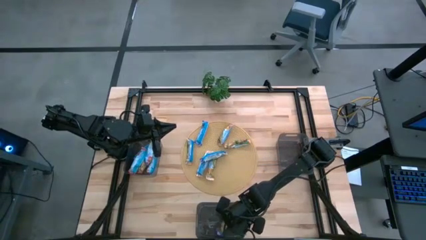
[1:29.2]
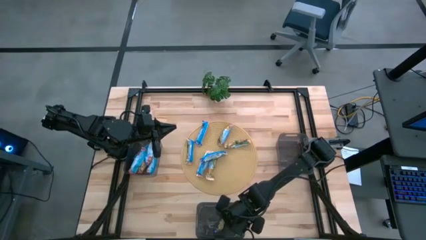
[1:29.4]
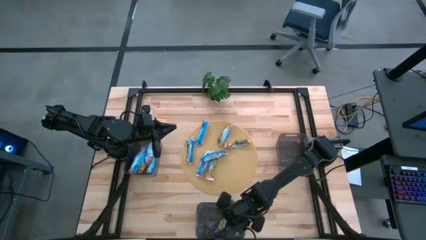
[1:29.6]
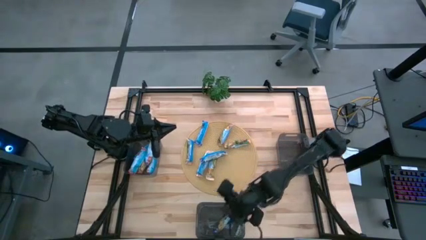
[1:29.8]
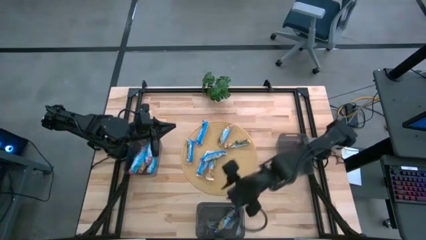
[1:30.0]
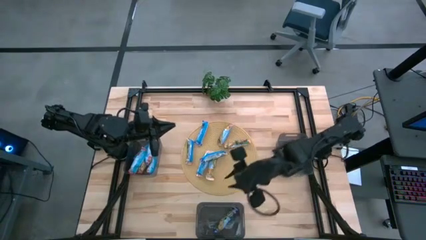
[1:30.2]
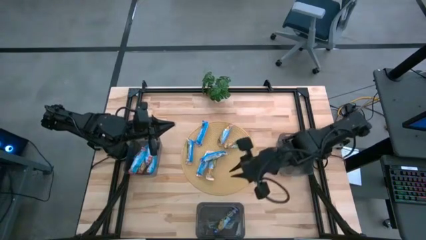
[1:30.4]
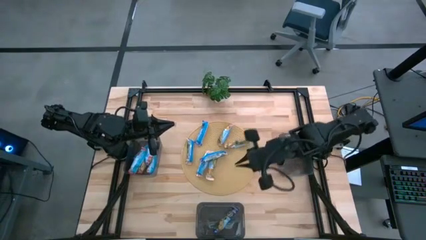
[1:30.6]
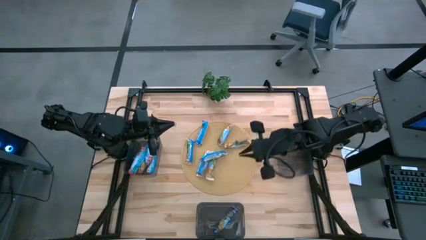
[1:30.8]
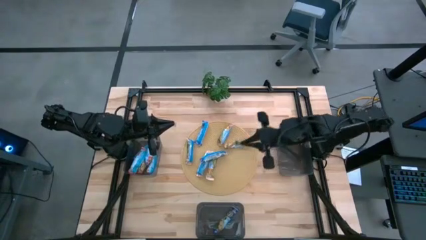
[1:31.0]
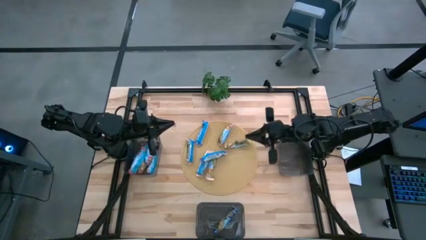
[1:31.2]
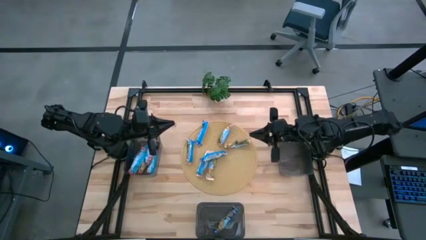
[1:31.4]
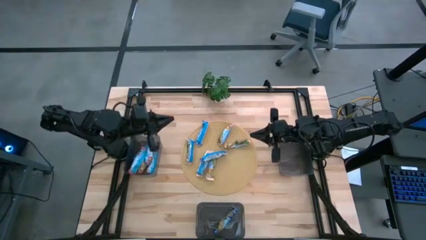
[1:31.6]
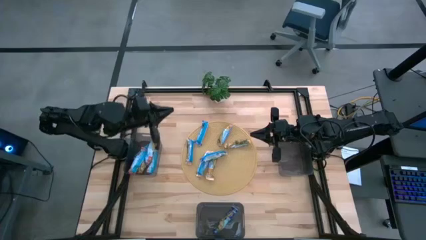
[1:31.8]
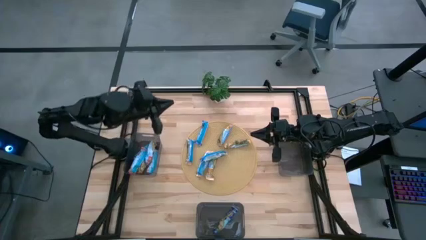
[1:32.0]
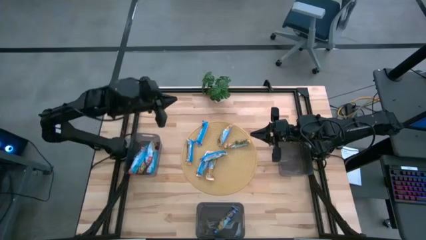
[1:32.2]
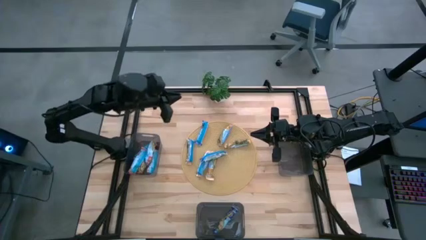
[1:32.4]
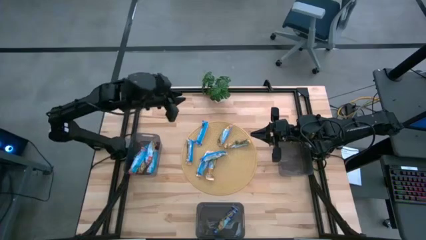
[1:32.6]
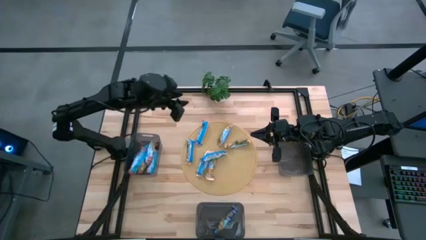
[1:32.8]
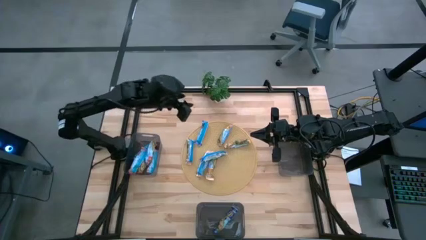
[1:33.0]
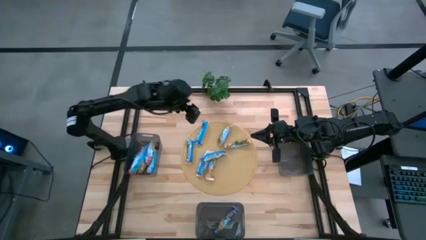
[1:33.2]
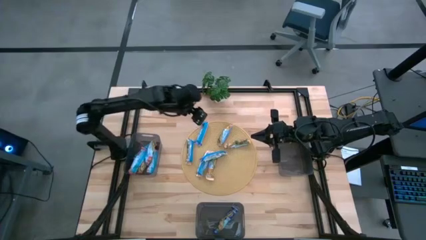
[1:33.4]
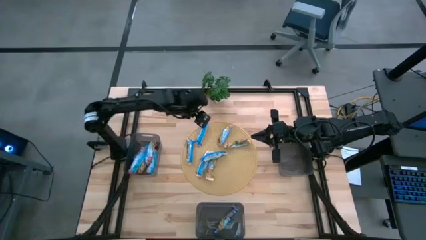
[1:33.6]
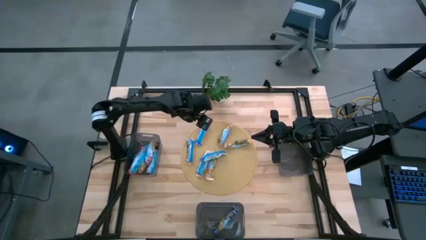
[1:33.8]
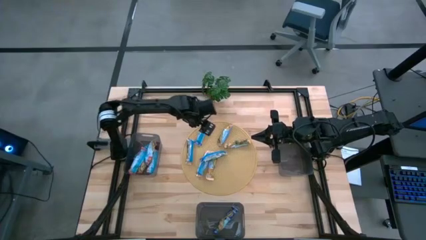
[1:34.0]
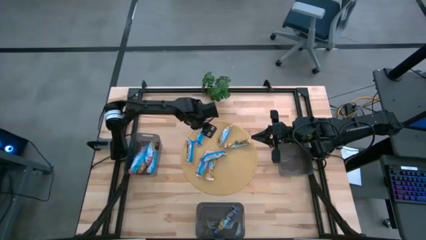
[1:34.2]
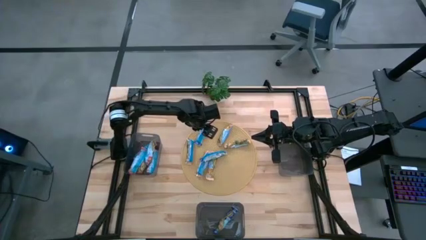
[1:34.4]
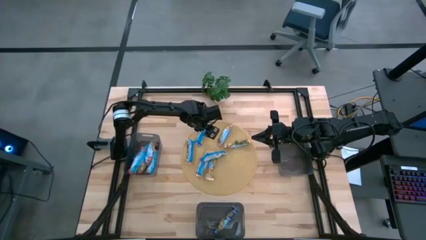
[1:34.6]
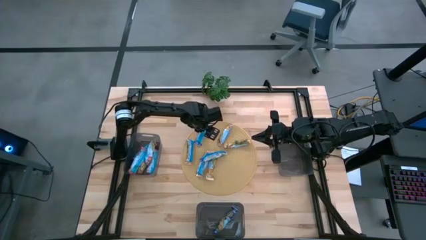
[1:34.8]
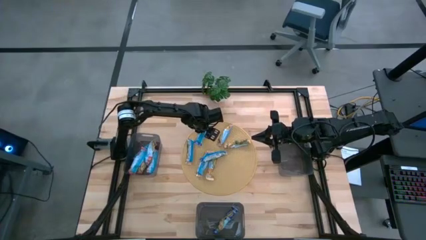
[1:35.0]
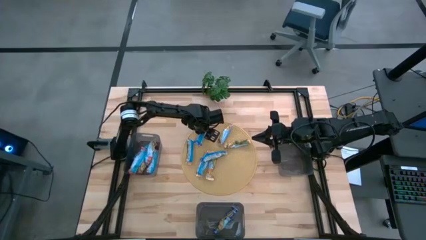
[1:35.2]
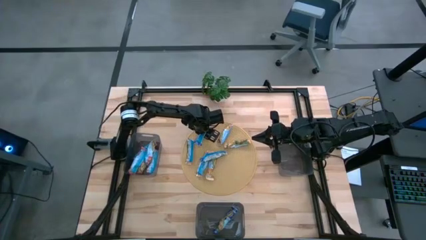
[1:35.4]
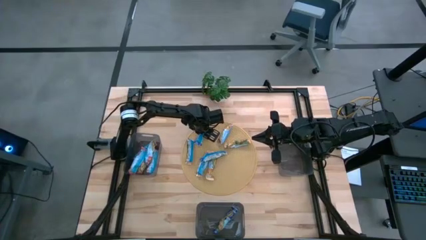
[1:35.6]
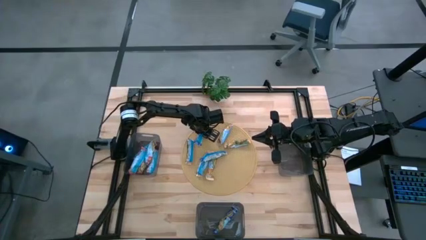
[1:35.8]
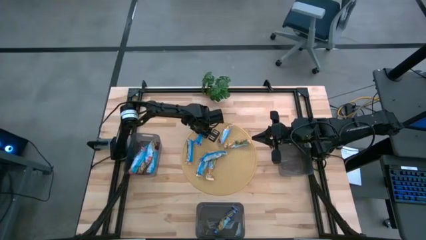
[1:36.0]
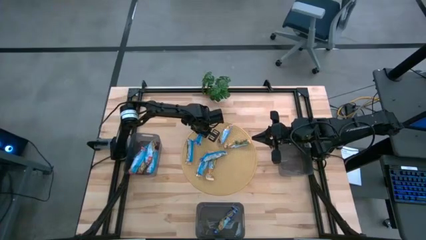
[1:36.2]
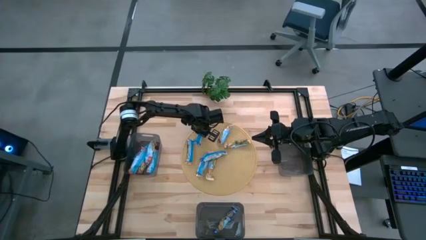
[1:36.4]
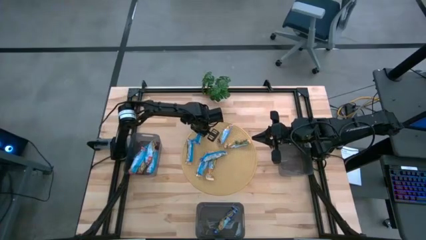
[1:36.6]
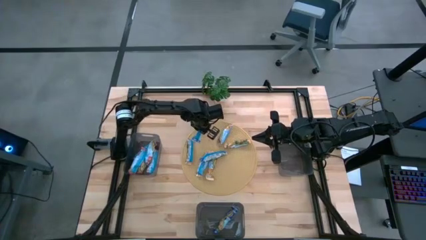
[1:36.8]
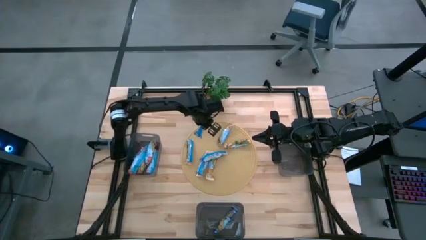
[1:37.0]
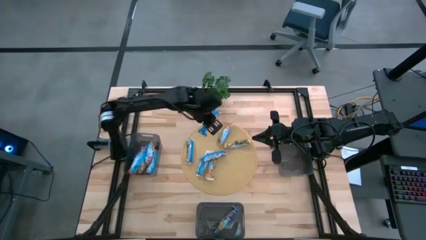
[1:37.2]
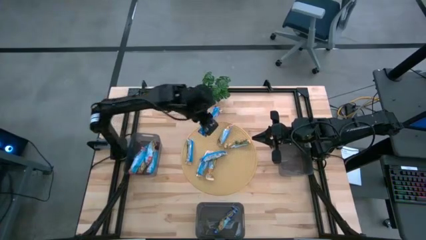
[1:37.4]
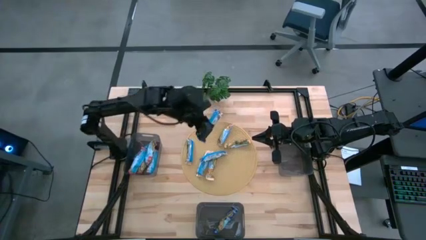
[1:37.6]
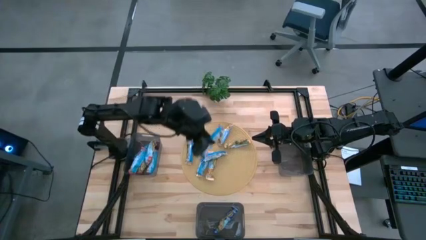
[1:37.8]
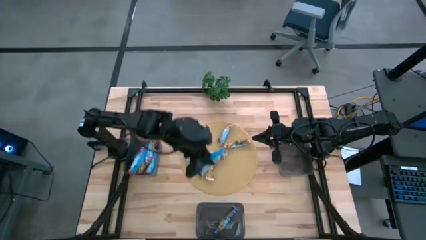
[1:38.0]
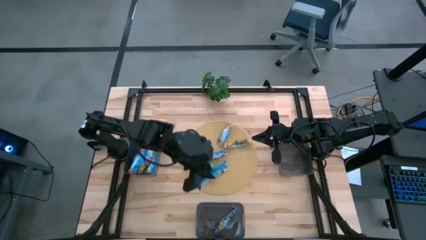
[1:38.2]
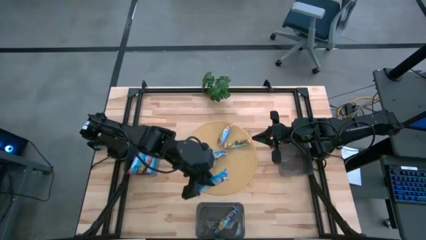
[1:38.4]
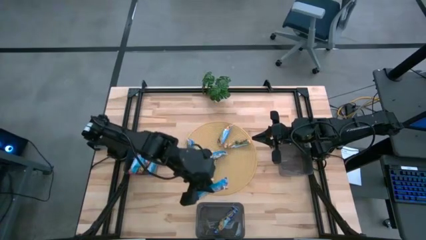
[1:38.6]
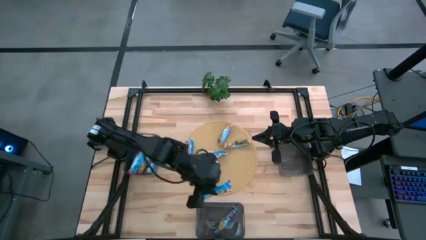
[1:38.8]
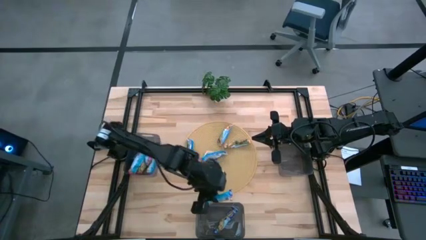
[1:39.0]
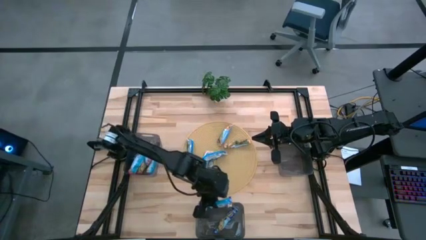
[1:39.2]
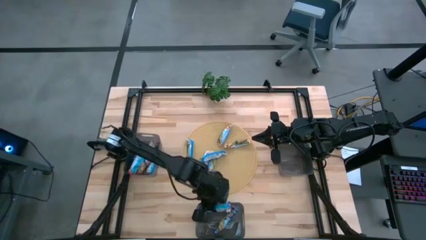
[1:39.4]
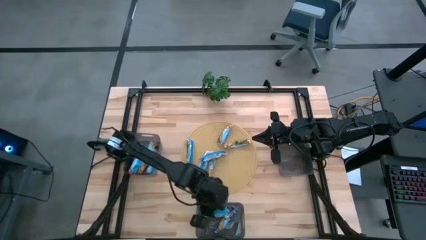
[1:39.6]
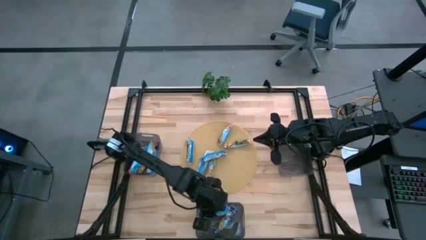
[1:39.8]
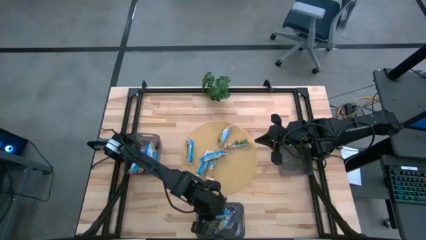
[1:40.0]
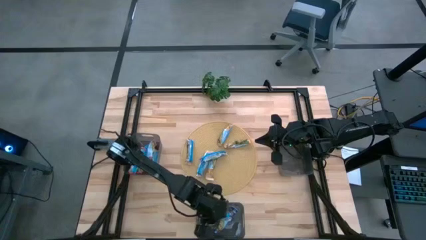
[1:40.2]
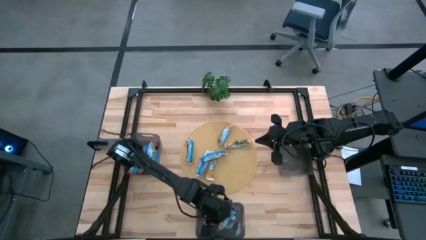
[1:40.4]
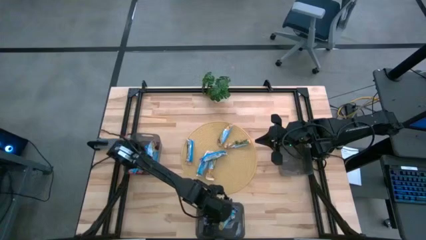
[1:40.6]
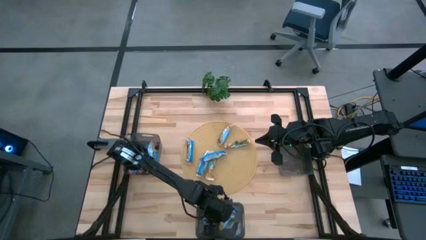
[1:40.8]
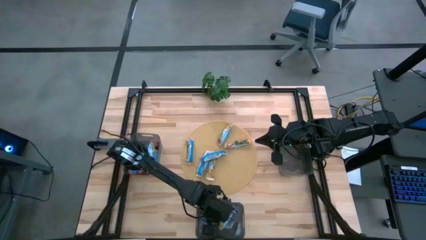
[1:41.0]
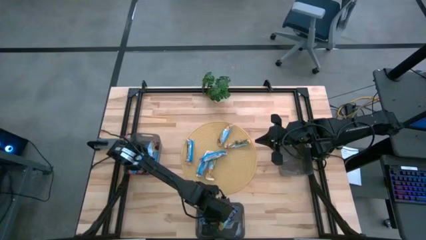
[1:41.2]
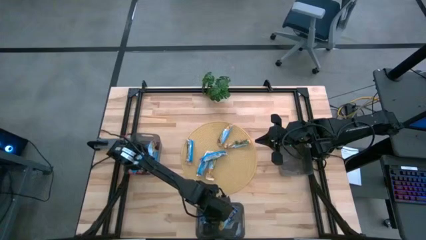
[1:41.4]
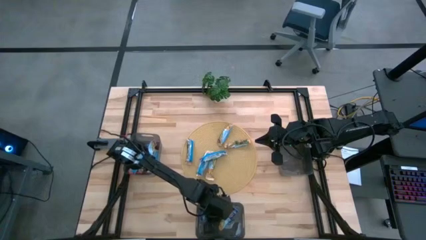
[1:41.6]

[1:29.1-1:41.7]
Task: Pick and place Granola Bars by type
Put the top blue granola bar into the bottom bin
